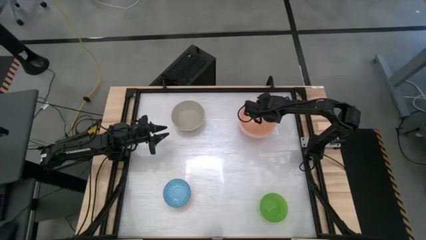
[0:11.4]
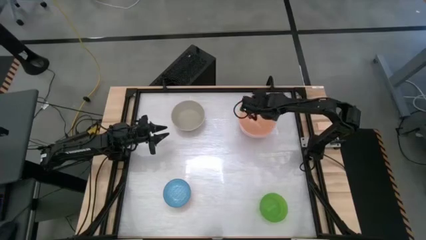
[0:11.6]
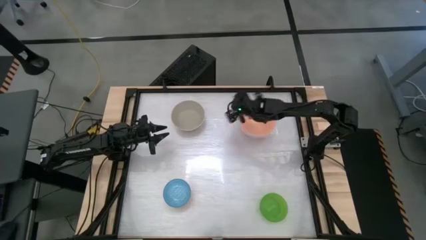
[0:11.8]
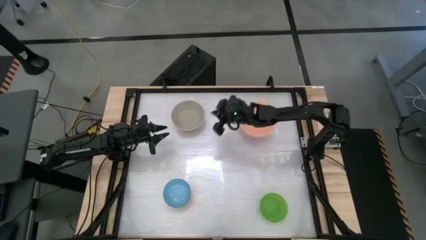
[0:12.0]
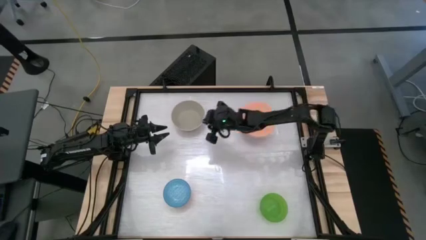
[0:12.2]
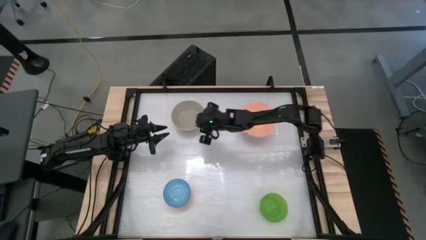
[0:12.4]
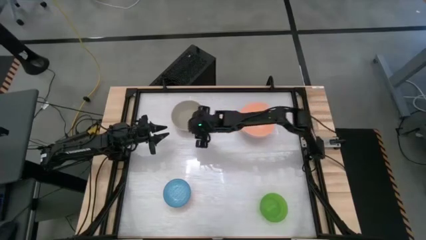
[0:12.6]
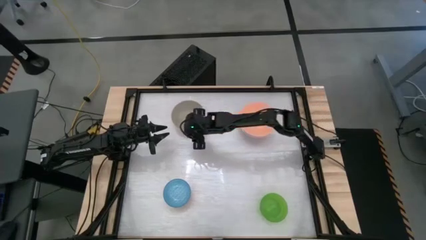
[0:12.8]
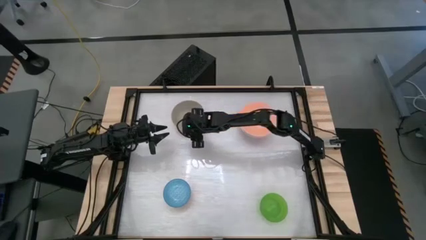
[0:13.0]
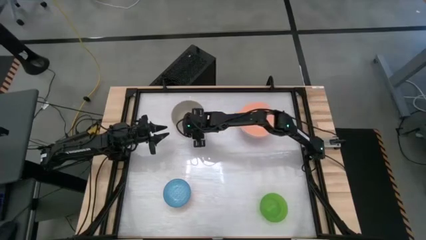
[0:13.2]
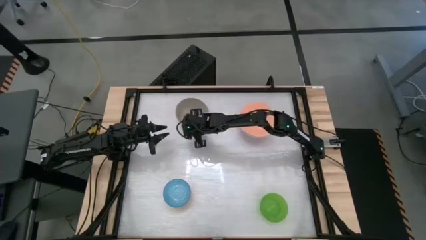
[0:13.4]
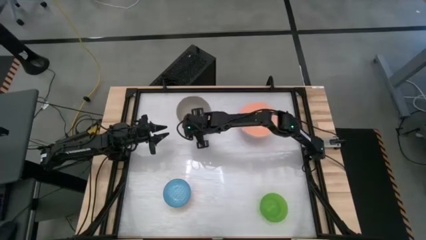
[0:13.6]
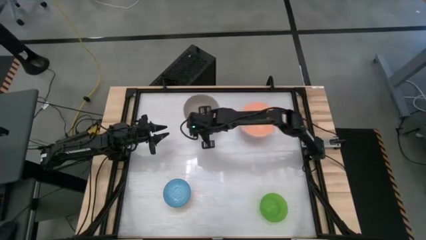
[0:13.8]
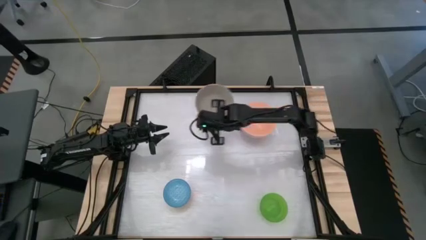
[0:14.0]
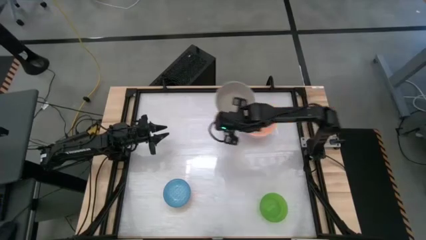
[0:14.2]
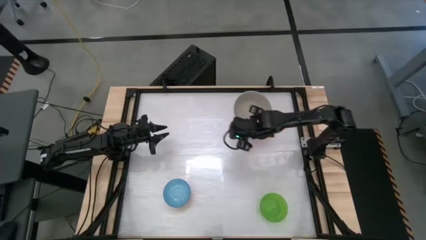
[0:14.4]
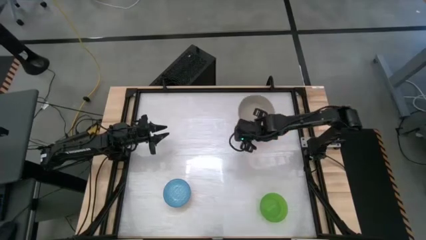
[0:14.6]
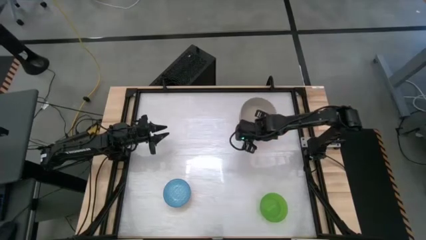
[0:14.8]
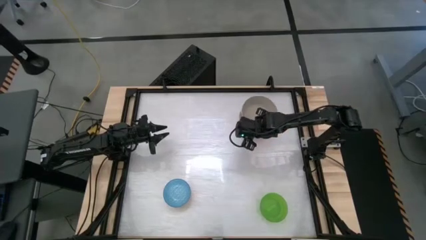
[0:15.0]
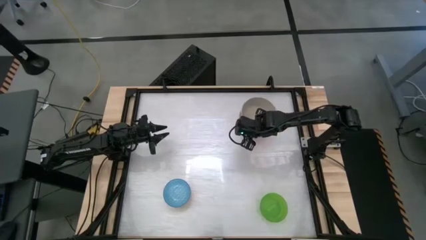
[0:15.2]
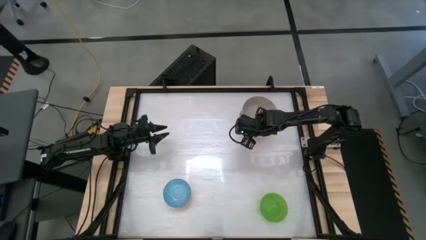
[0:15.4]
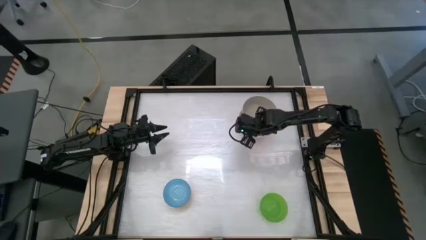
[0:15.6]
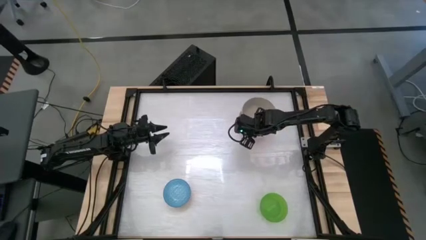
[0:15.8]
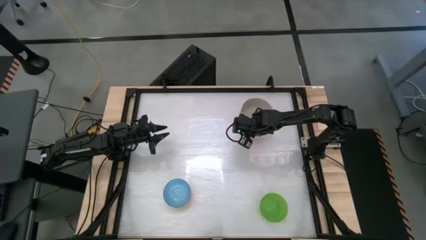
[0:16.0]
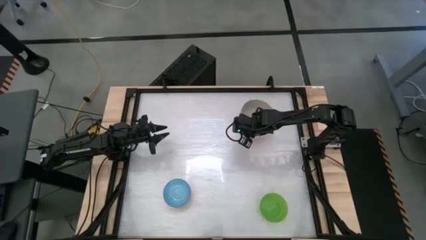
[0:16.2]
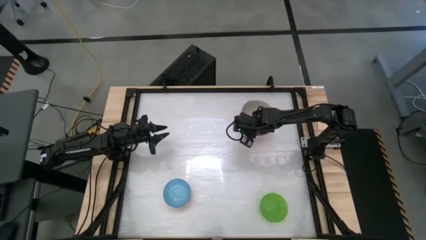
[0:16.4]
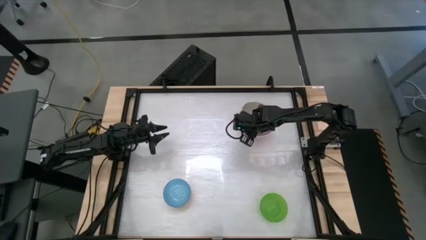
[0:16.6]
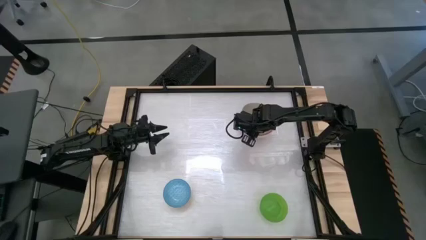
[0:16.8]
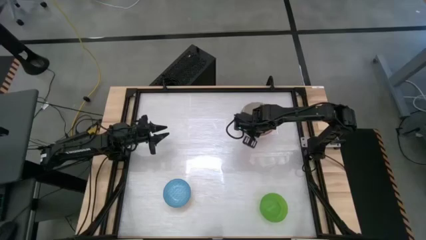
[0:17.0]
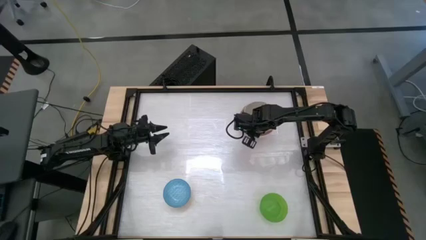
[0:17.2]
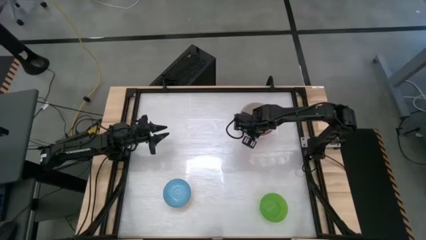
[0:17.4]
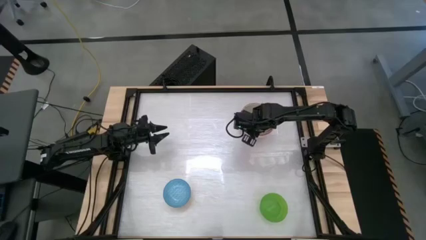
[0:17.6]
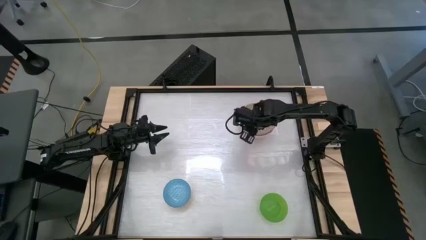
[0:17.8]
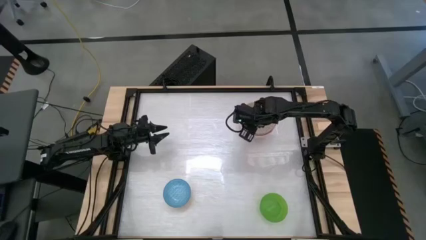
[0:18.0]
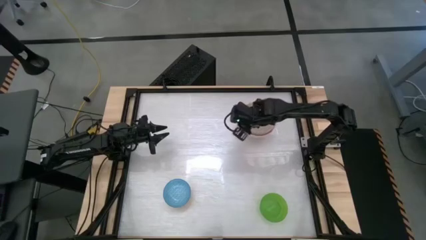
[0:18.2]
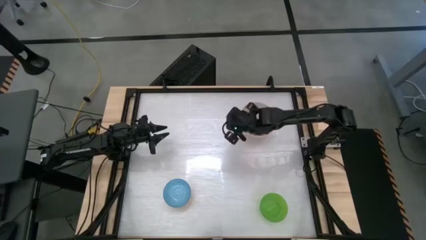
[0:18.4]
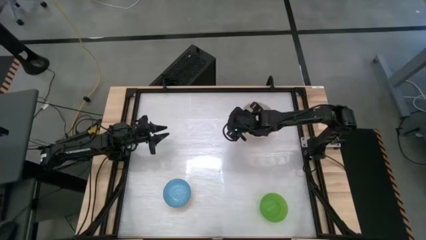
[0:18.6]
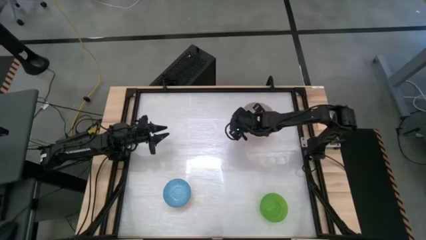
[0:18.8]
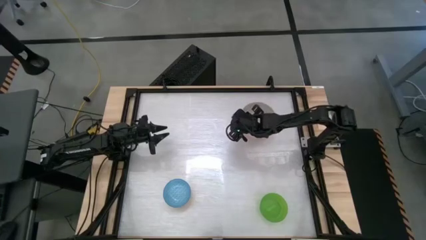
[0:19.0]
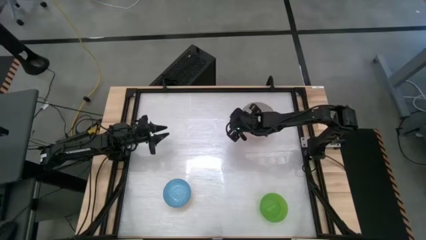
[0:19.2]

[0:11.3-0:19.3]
Stack the gray bowl on top of the pink bowl

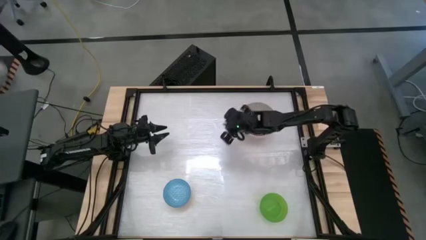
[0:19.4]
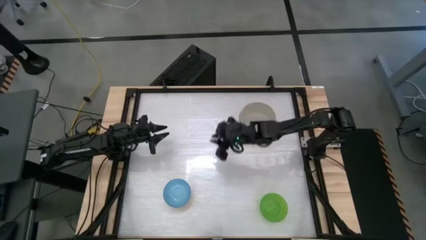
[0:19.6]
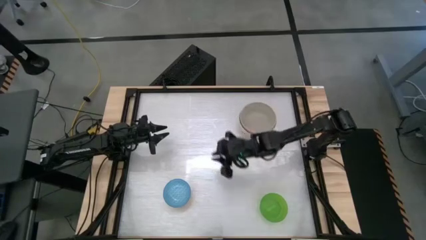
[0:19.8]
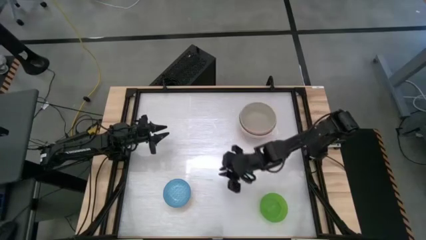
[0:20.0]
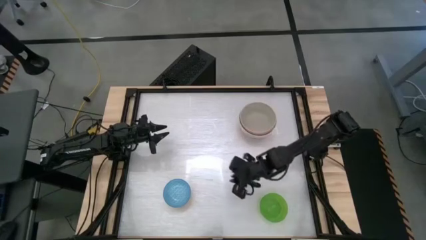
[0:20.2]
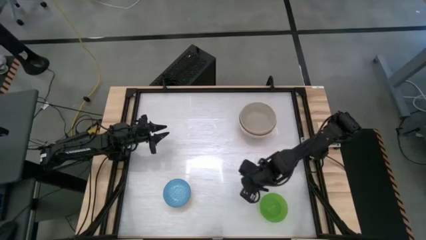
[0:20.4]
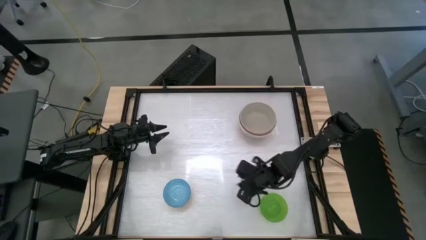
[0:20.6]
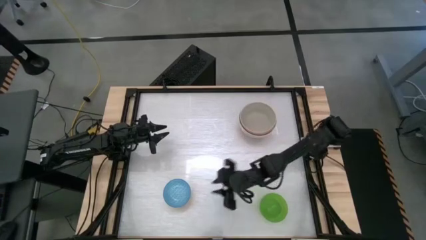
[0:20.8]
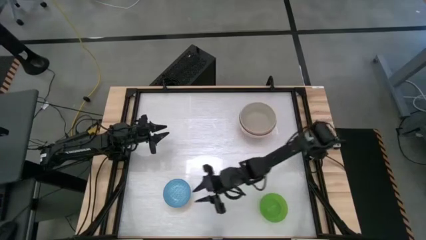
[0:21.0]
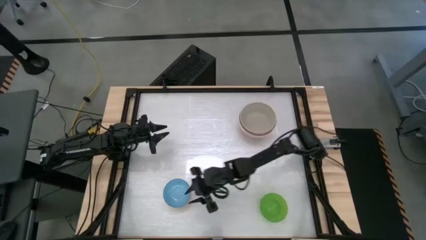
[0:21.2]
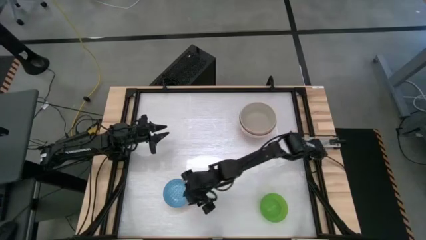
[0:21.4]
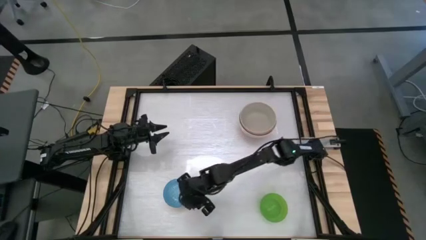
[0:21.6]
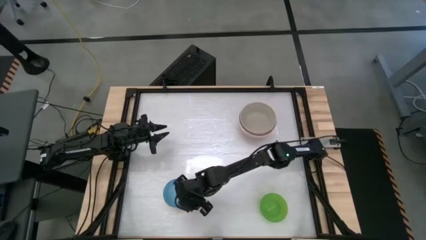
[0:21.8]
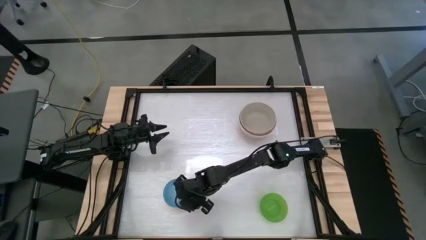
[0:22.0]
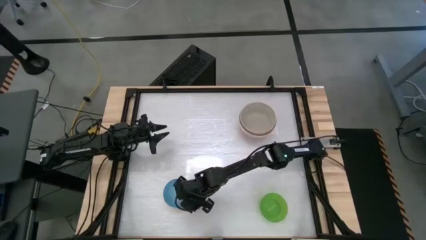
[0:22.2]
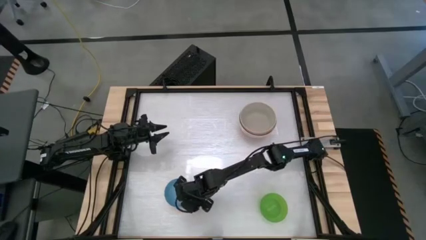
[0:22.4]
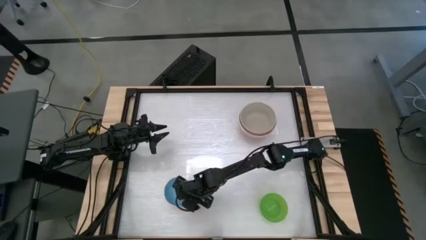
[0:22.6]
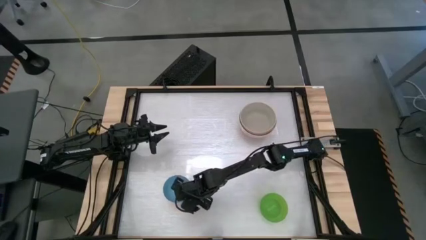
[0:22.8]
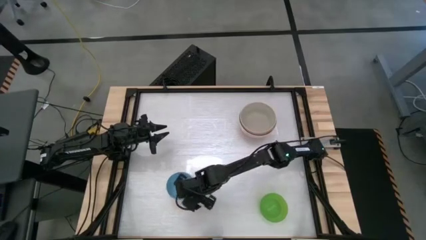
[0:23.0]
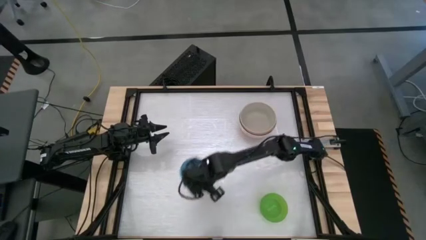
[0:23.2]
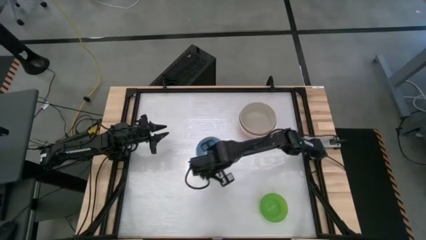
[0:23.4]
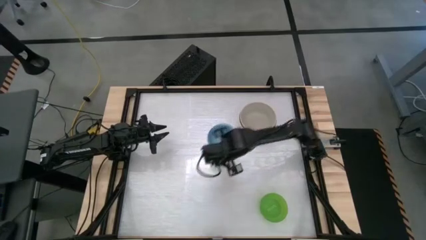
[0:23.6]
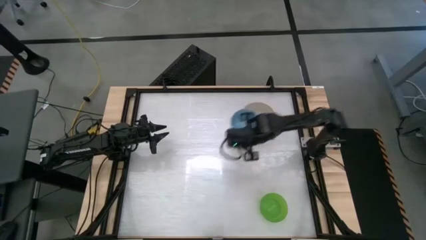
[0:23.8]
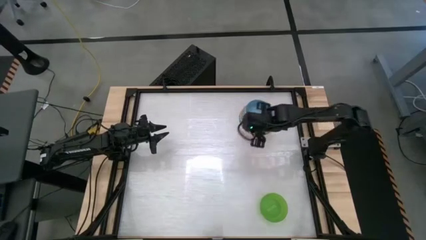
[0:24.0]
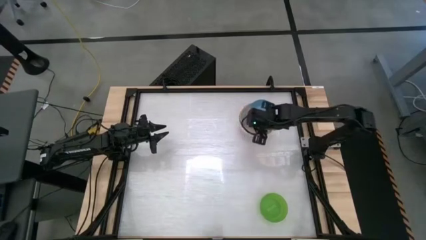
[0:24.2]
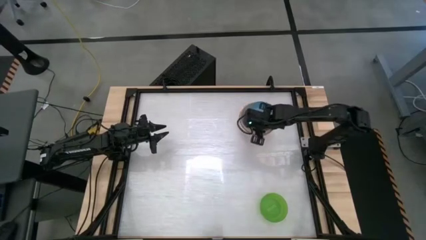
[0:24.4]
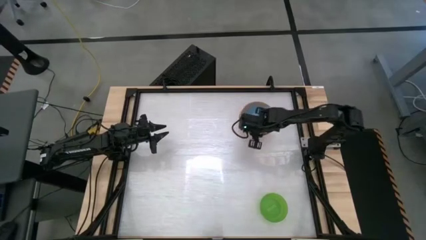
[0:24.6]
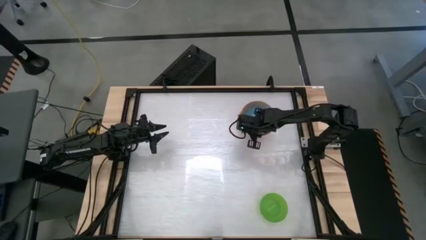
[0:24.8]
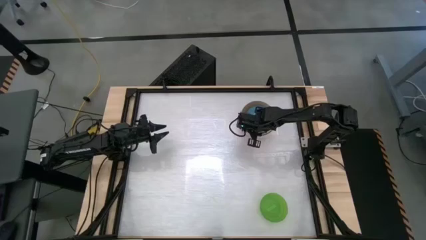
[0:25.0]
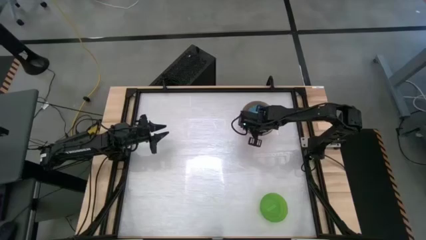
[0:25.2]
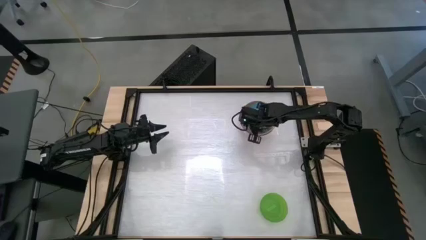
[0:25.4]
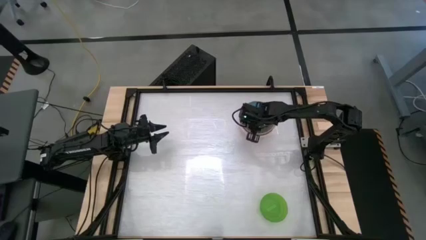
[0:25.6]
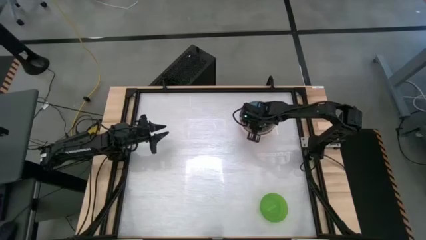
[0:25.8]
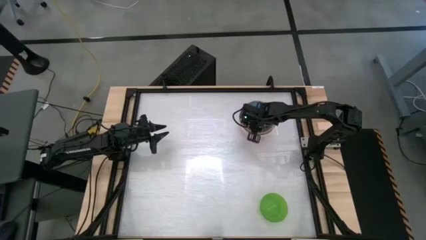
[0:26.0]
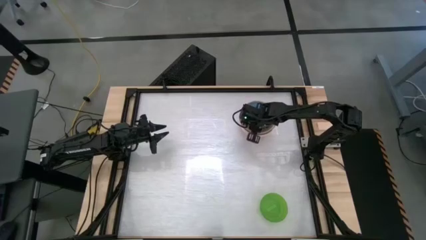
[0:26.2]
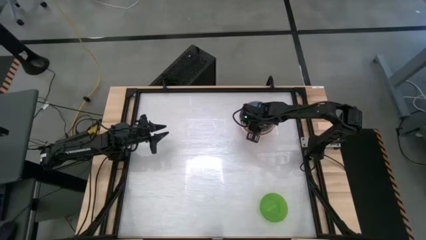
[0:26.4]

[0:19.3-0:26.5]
Stack the blue bowl on top of the gray bowl

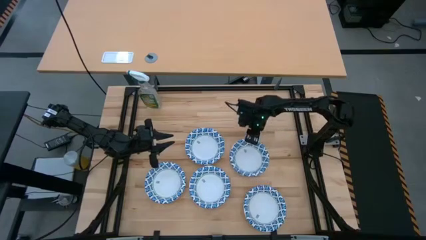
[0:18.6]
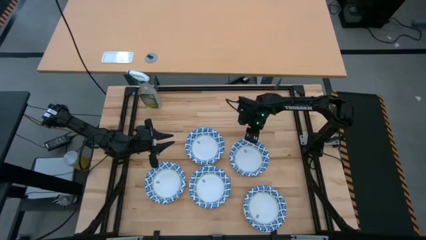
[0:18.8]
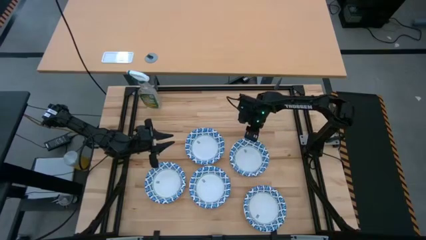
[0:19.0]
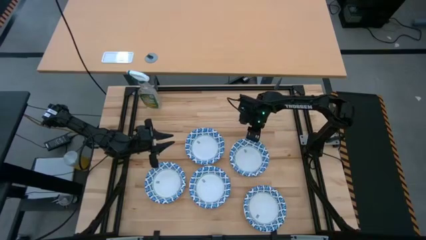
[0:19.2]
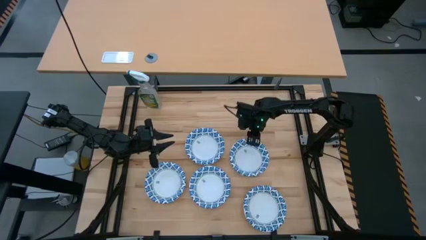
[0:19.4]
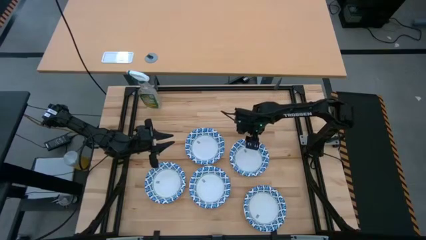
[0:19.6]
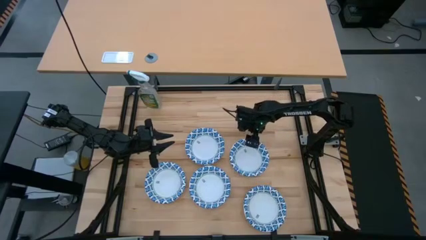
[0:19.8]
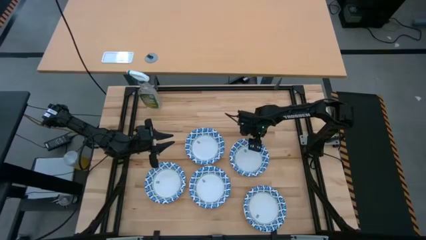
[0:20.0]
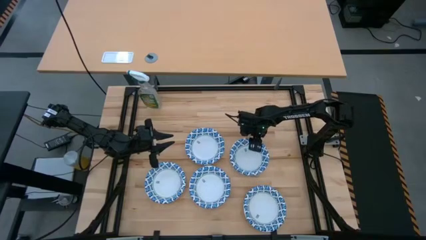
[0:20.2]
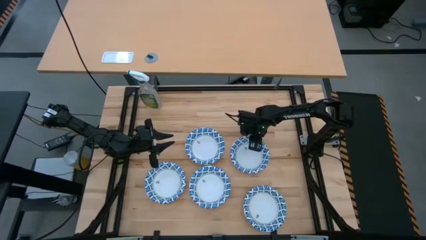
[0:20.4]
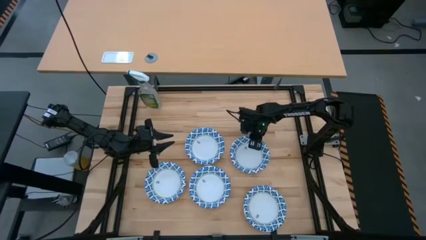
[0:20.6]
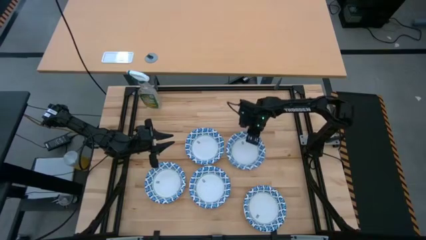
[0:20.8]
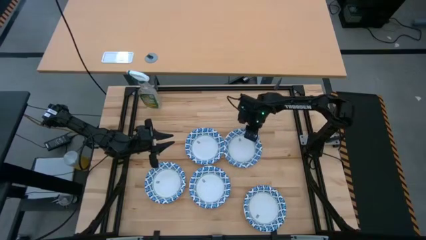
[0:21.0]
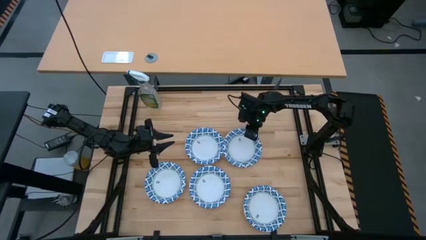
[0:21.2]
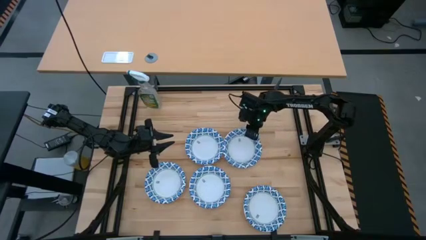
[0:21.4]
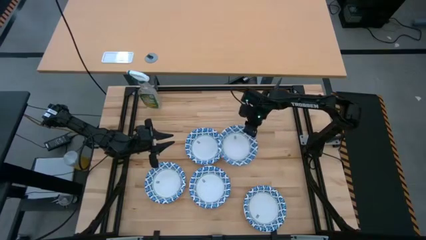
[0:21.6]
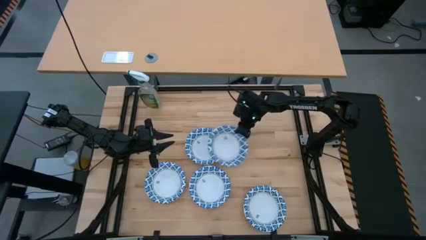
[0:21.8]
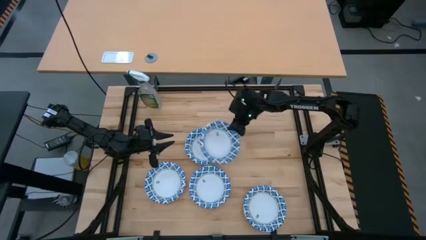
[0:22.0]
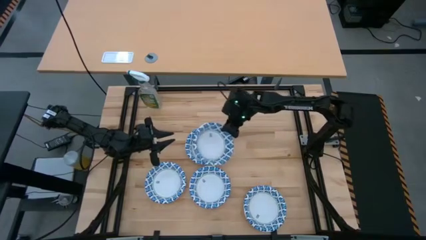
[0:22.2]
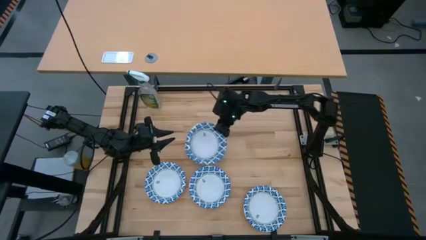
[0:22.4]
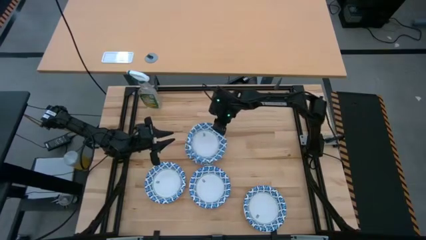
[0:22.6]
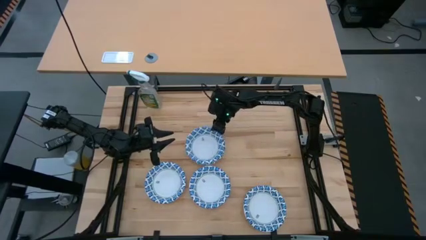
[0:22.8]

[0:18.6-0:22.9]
Put the white bowl on top of the white bowl
